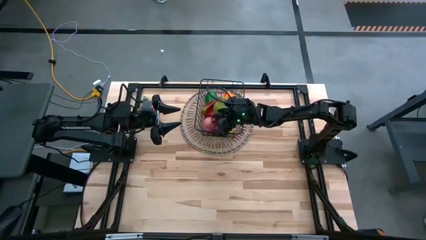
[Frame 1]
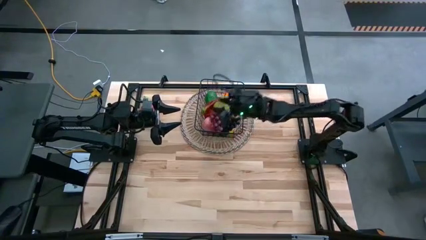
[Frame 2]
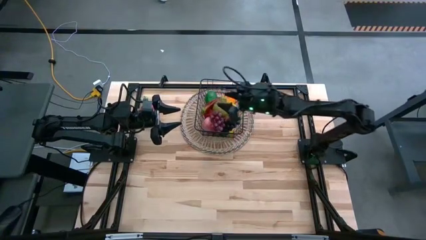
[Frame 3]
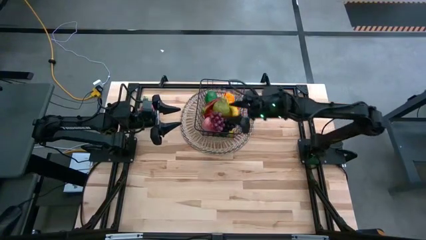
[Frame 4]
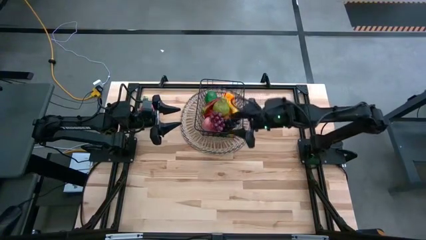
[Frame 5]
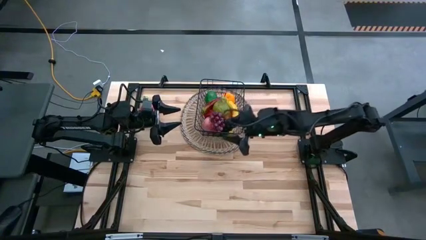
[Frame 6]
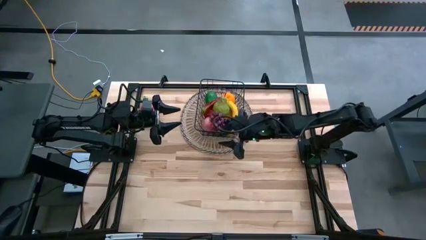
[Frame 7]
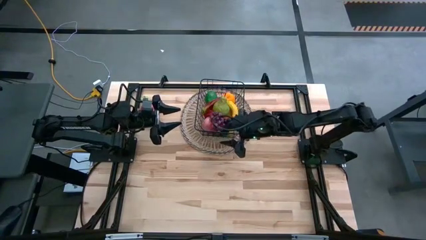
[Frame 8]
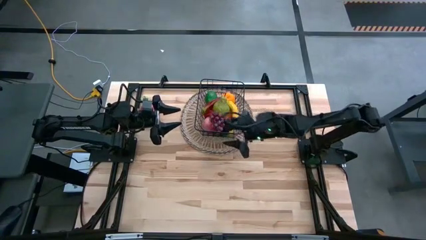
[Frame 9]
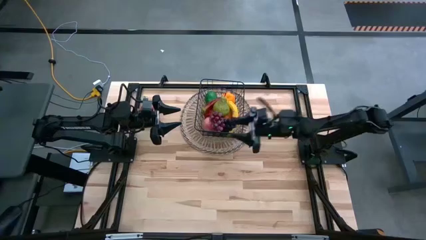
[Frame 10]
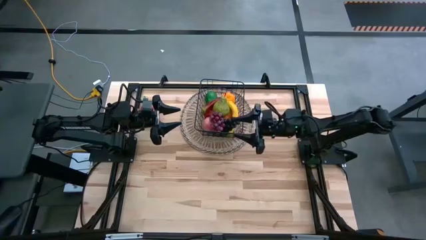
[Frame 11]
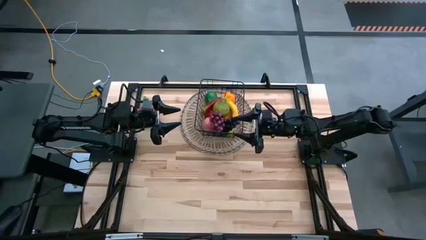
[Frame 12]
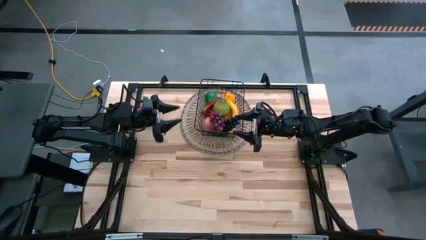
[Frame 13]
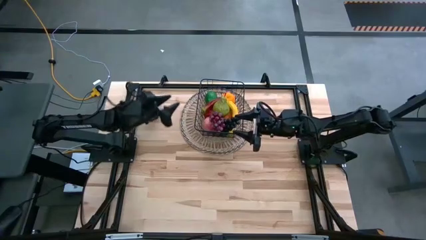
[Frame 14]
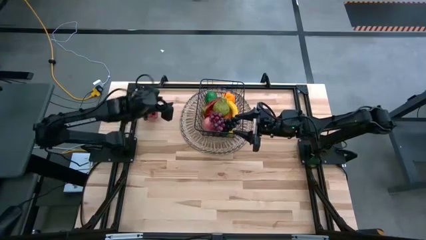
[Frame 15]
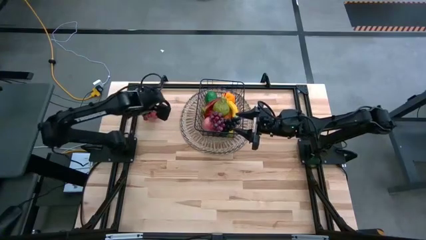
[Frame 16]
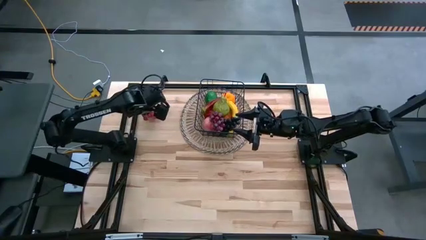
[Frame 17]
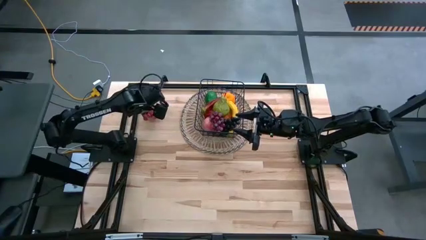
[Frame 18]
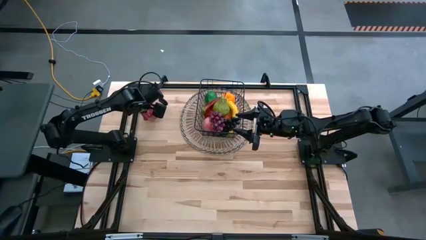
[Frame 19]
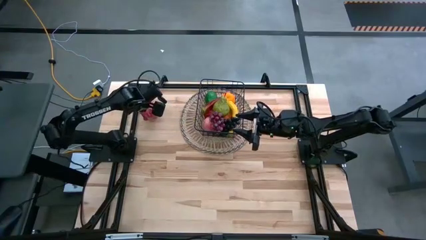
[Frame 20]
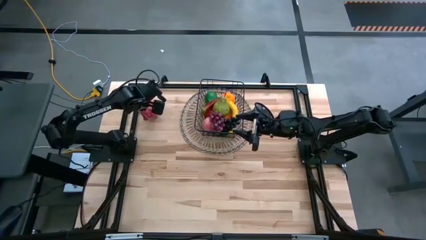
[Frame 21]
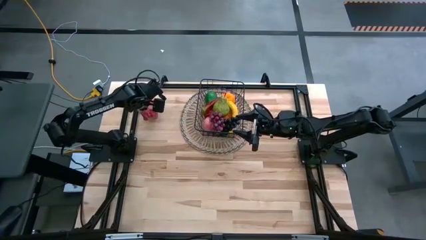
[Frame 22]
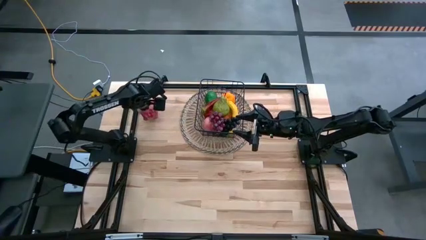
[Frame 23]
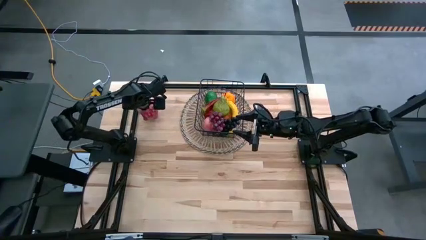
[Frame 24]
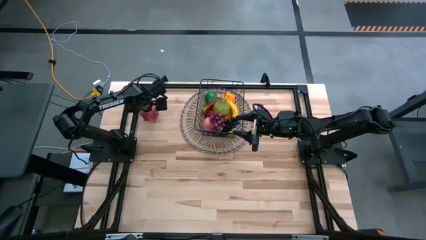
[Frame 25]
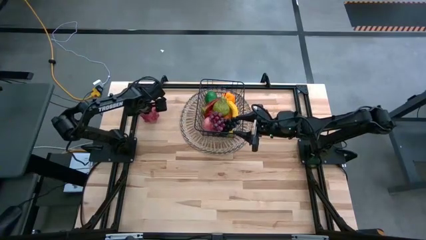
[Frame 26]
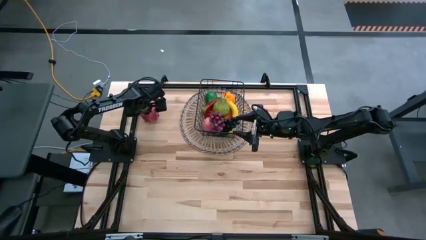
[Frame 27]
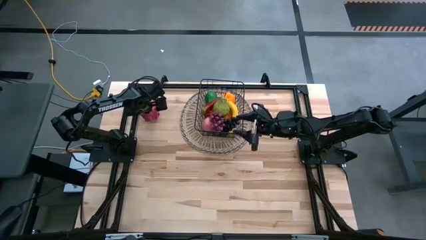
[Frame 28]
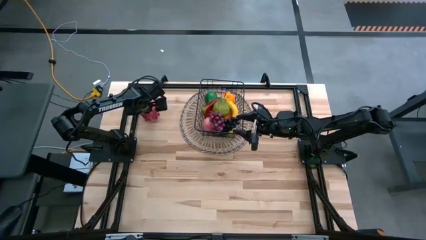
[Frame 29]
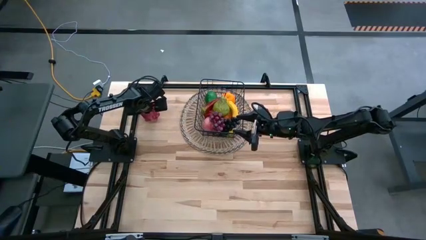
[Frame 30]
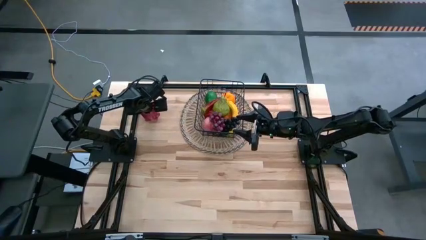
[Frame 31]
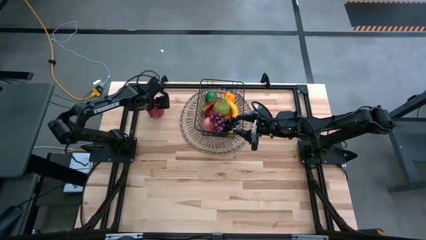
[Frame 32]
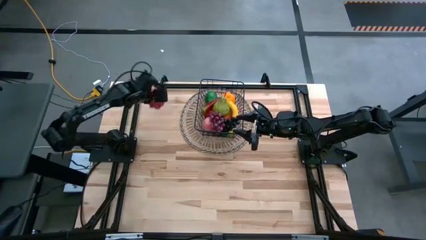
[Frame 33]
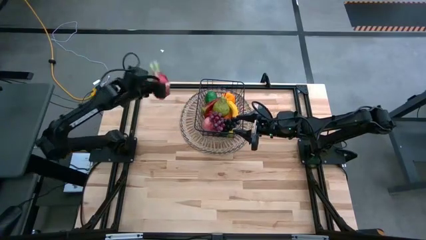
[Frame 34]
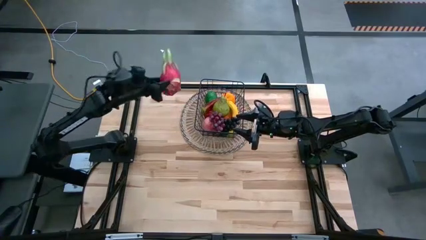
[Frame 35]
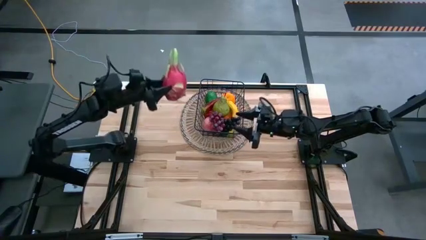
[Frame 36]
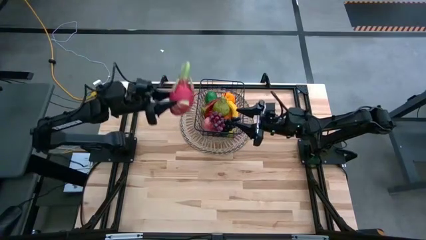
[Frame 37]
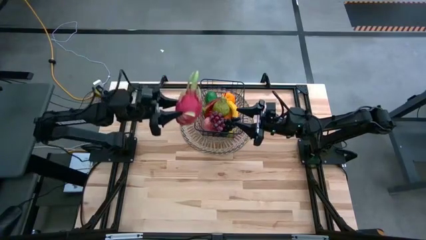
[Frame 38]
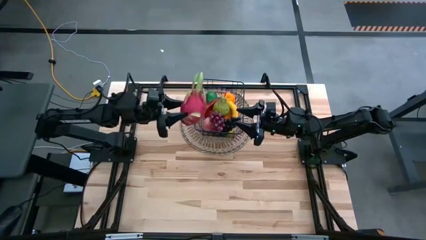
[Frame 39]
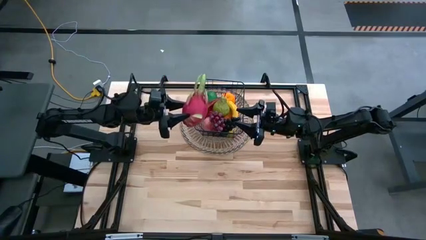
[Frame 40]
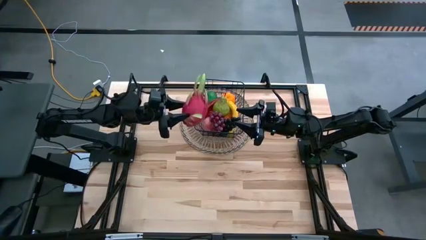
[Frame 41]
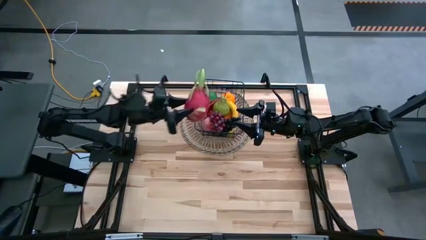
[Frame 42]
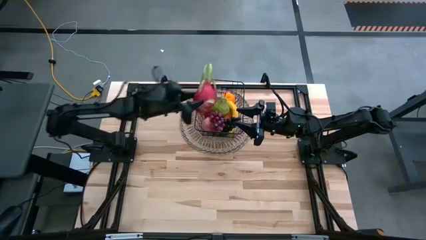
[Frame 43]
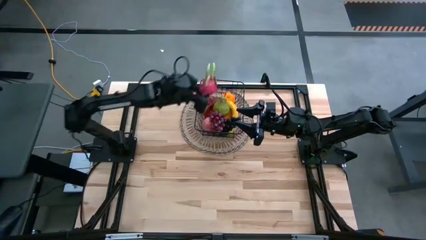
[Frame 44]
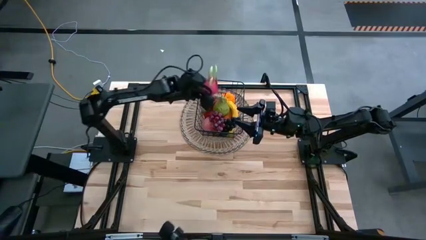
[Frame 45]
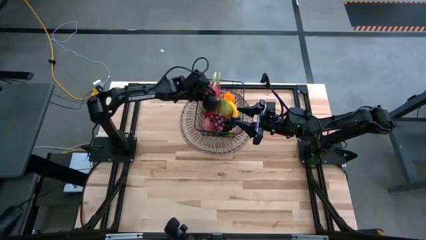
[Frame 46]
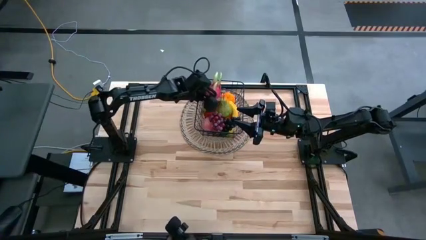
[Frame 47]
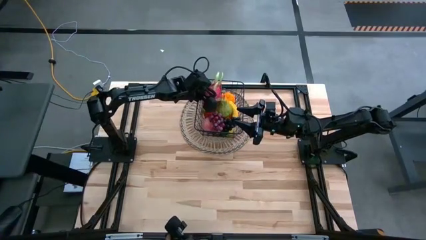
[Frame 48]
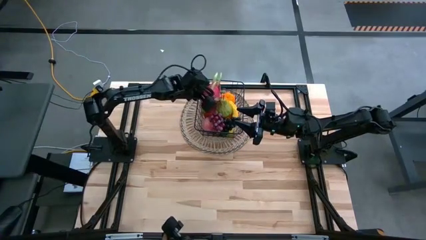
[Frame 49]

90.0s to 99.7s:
Task: Build produce basket
Put the pink dragon fruit into the black wire basket

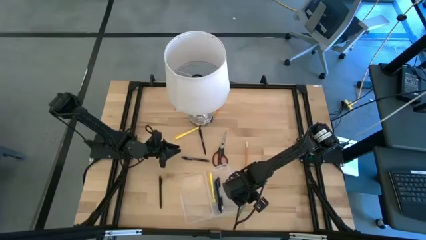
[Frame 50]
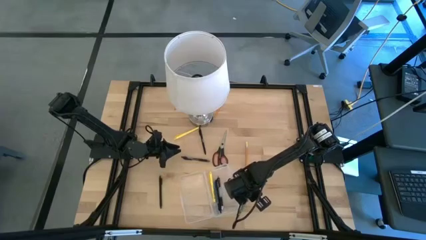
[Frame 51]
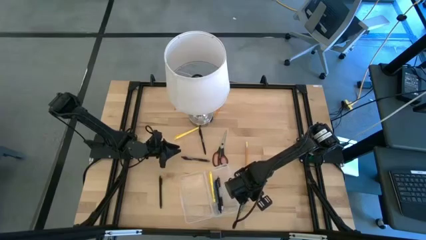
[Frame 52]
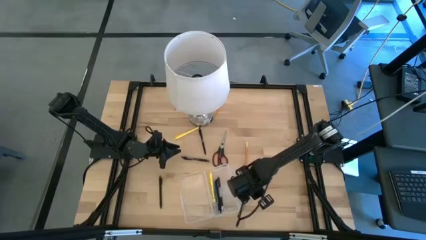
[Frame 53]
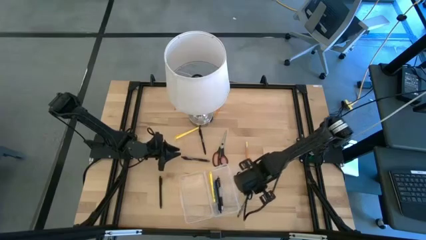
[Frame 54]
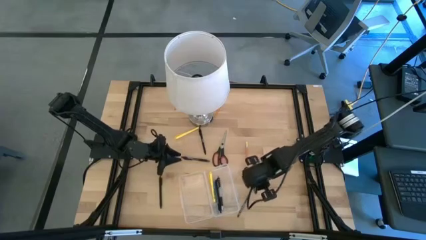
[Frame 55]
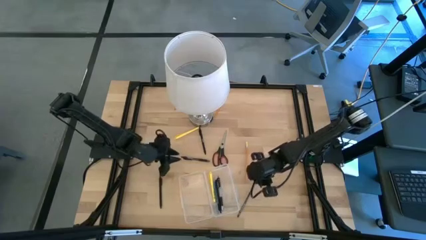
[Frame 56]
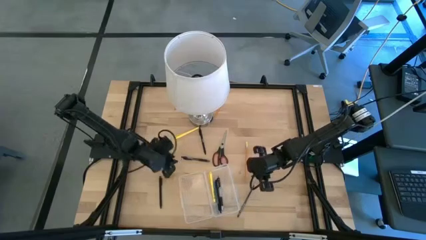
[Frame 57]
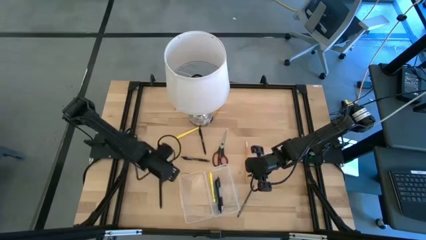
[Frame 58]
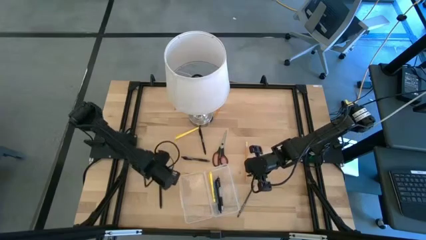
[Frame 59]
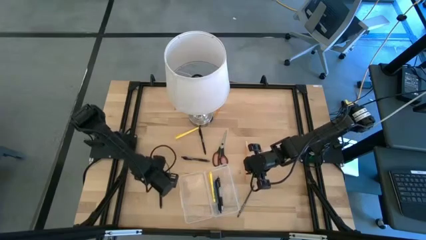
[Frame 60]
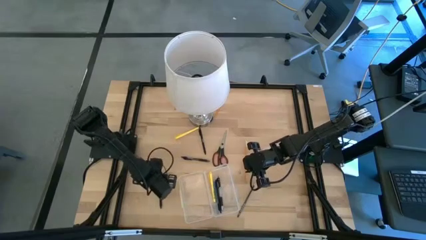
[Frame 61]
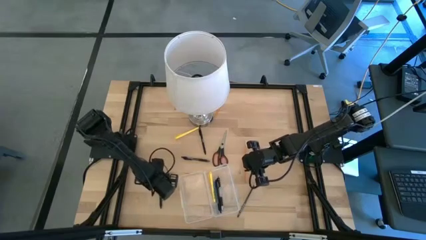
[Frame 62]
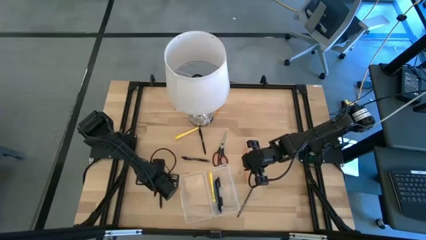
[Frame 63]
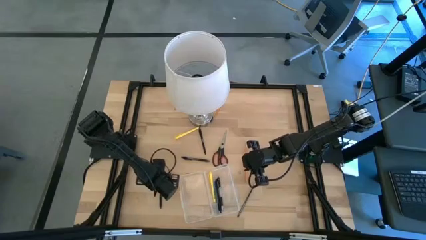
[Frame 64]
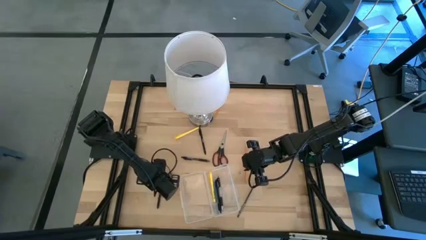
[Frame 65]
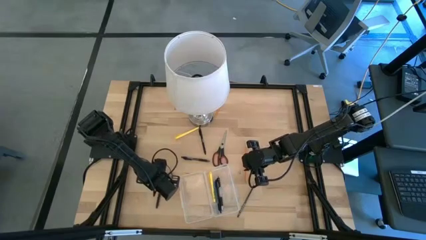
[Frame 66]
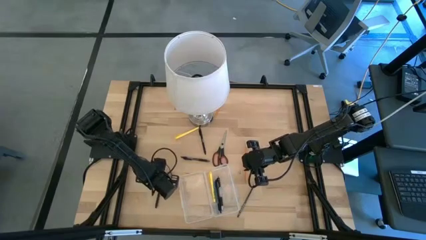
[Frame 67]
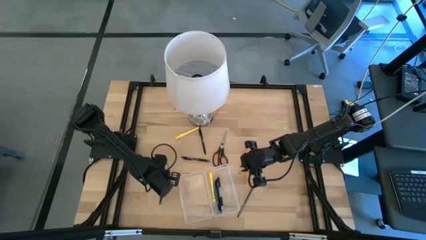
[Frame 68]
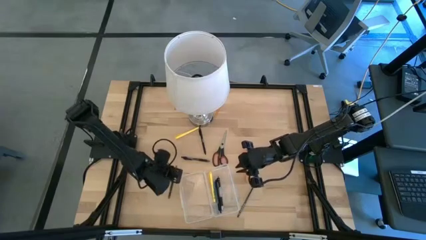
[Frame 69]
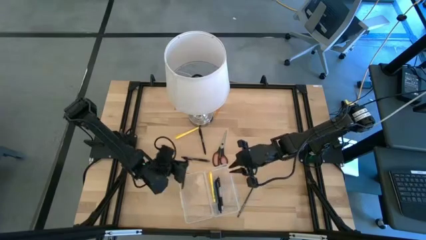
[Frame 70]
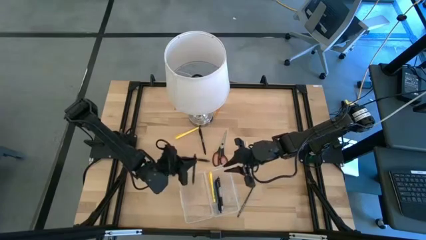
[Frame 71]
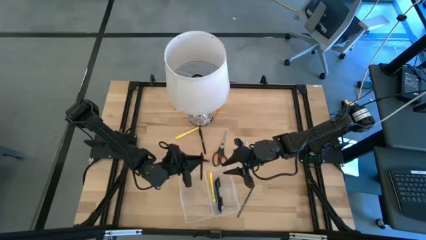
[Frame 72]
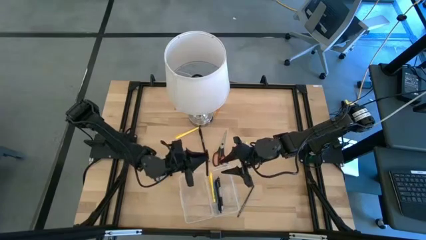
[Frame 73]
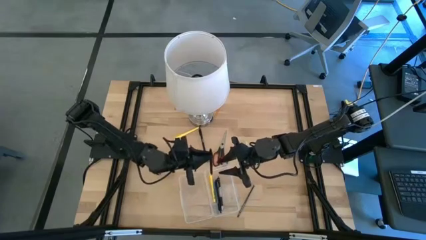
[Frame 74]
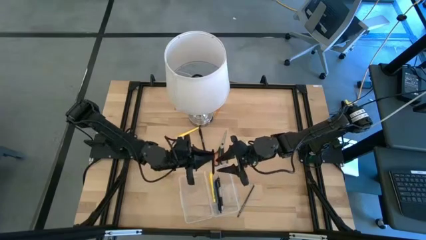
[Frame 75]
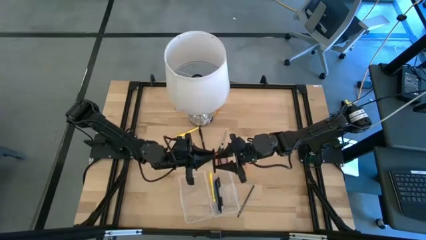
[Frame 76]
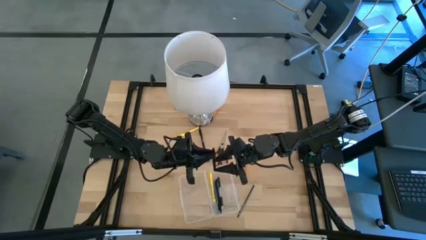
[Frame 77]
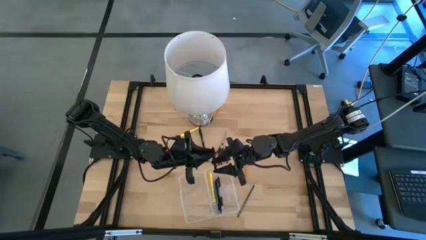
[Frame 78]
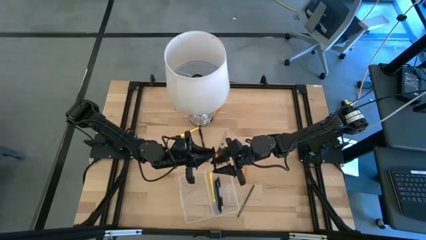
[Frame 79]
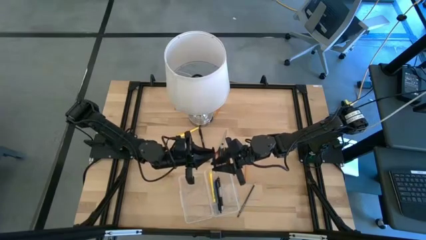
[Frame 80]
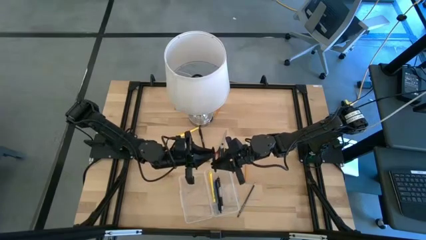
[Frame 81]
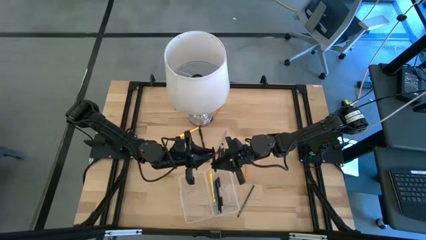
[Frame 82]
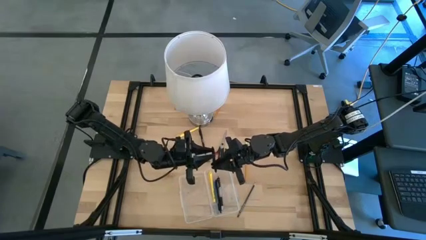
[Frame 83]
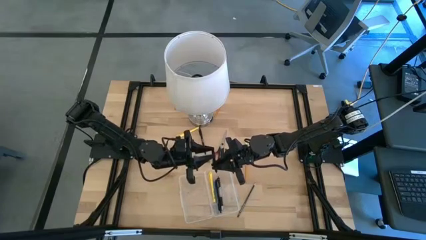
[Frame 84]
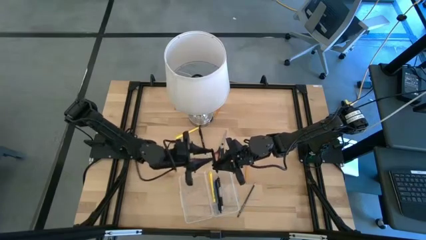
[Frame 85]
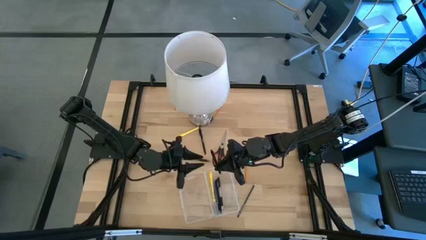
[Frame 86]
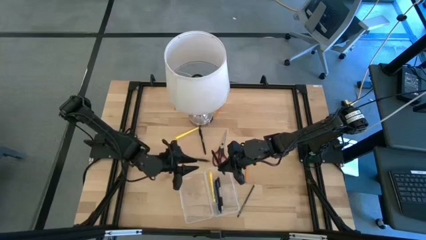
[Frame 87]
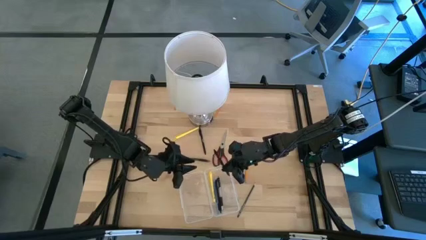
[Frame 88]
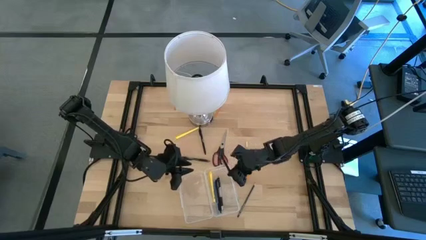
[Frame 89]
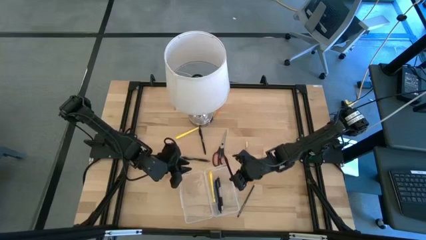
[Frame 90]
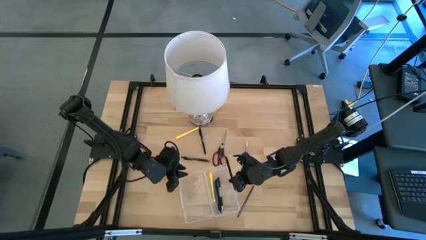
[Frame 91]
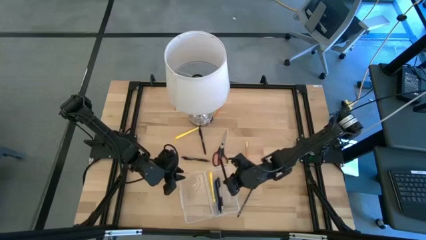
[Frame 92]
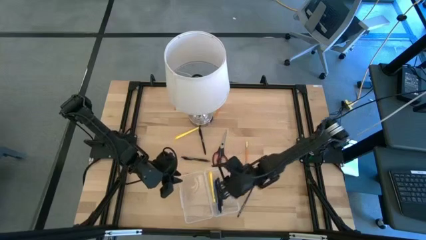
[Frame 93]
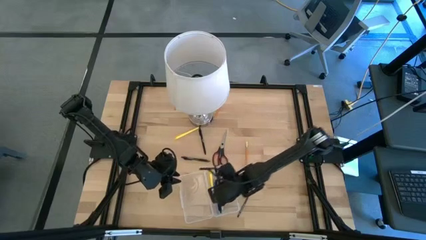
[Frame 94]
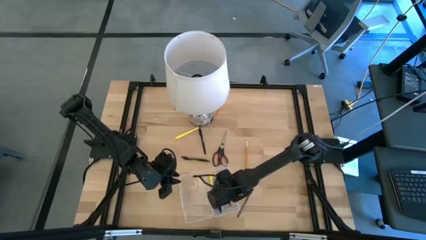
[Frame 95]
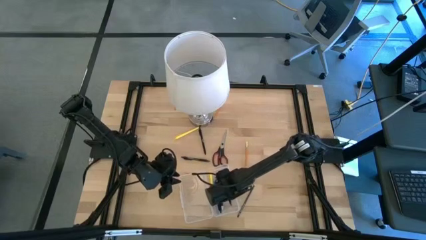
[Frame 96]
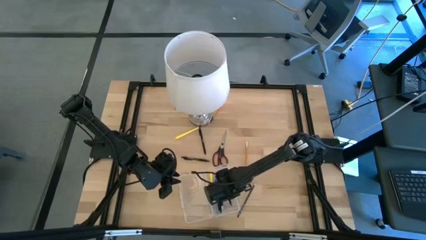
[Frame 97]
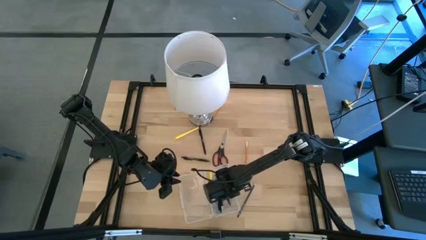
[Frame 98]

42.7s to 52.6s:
Task: Pick & place school supplies into a supply box
Put the bottom black pen into the transparent supply box
